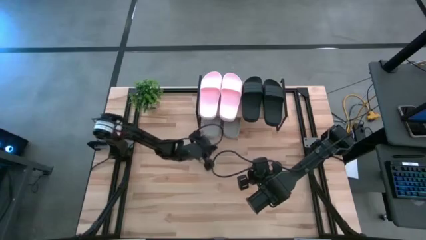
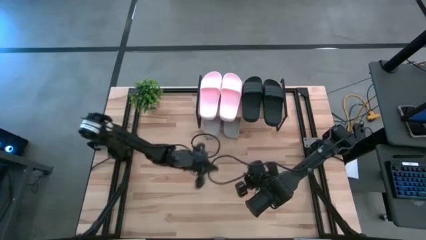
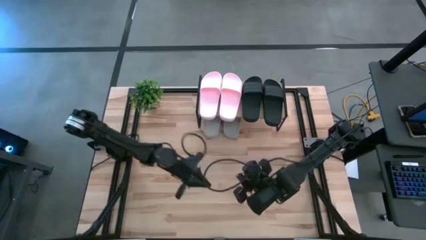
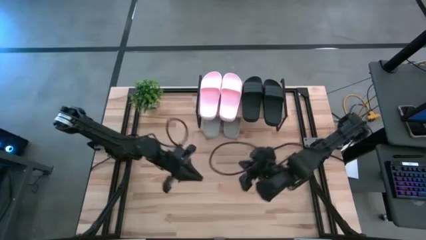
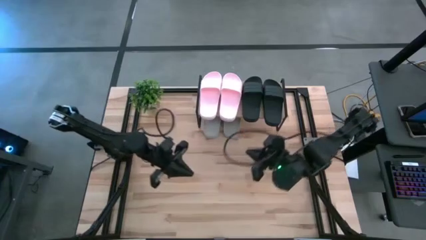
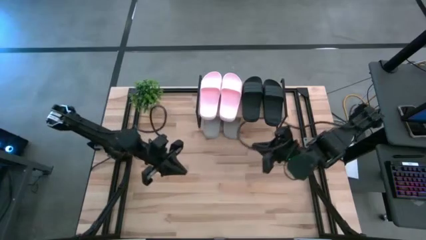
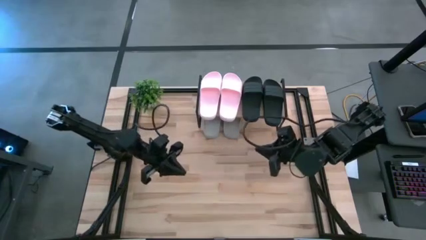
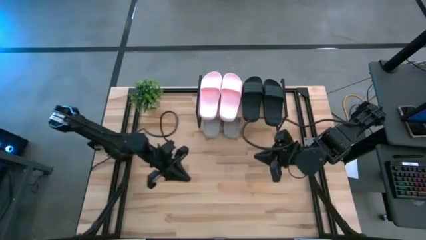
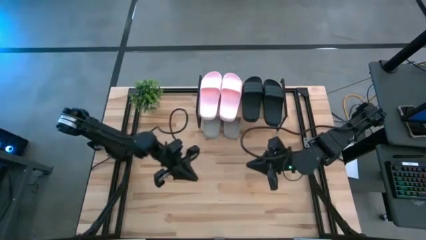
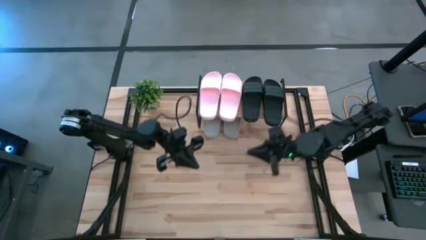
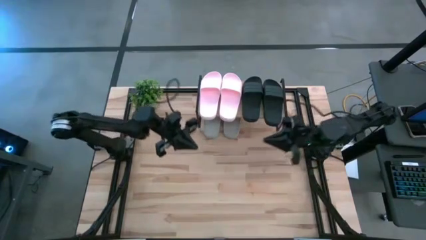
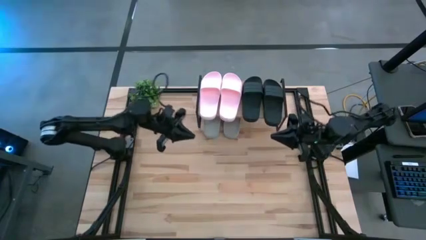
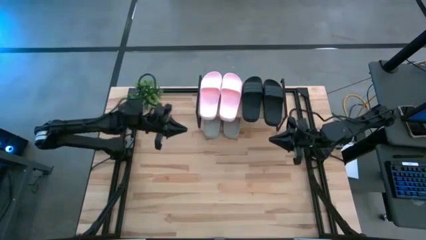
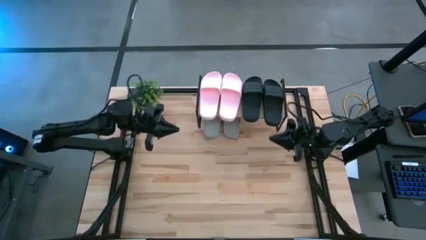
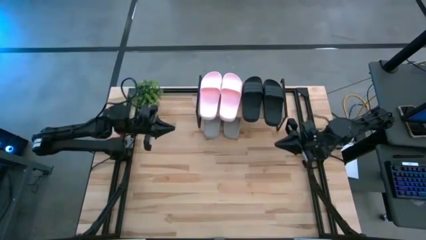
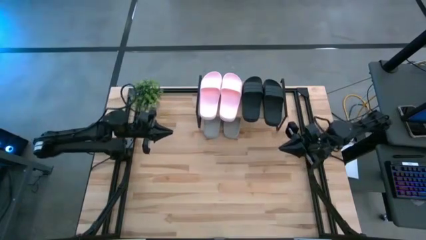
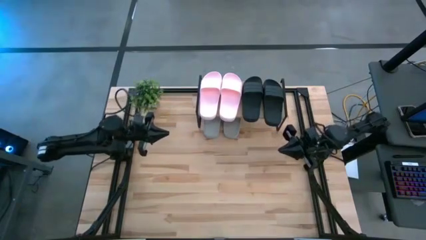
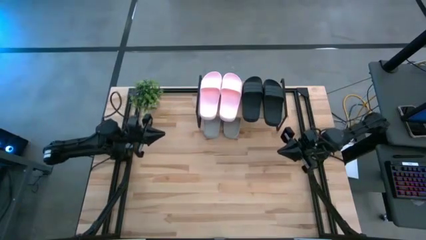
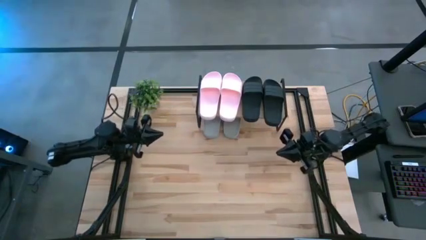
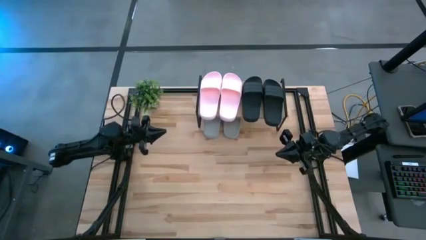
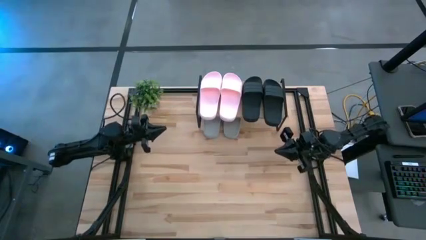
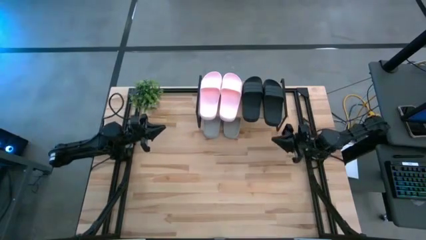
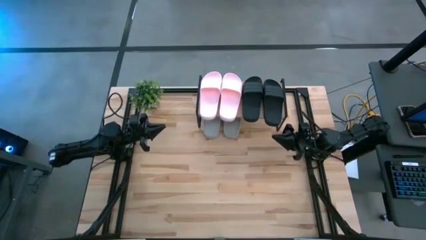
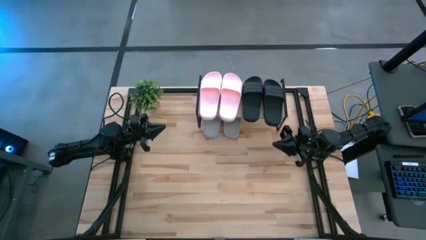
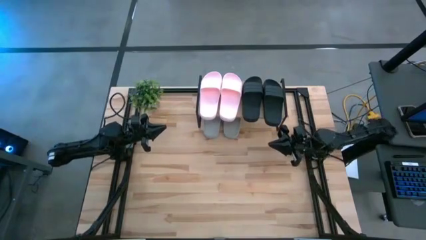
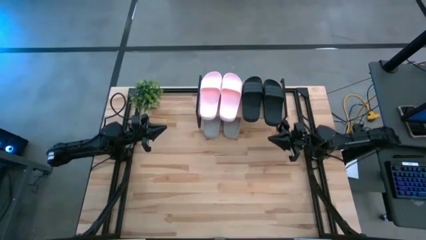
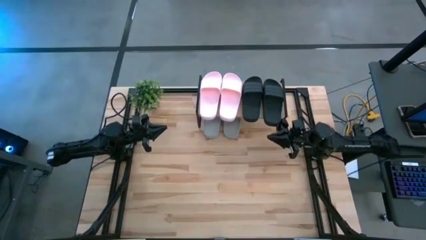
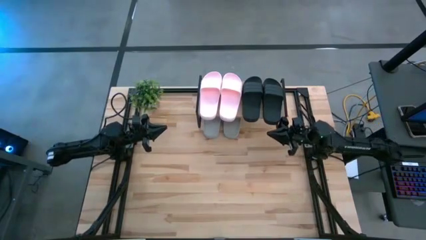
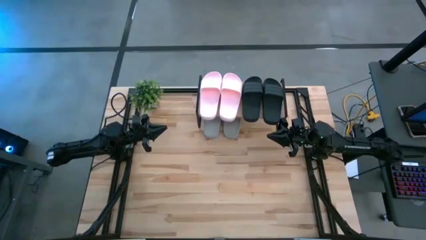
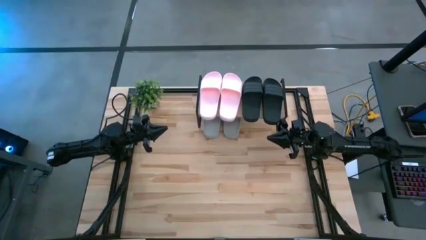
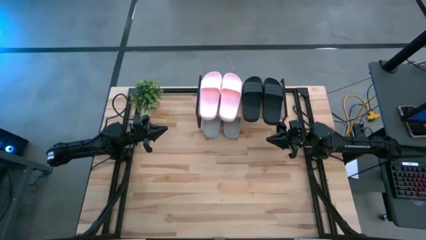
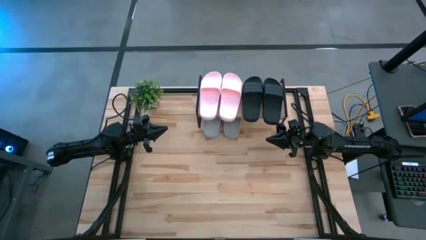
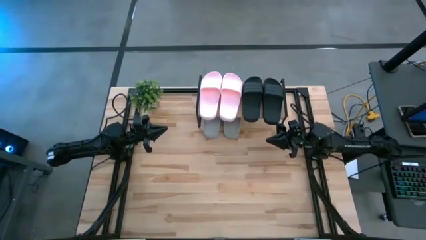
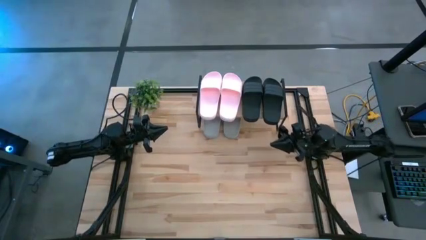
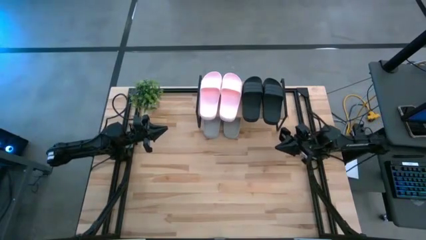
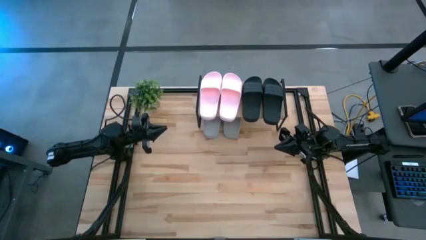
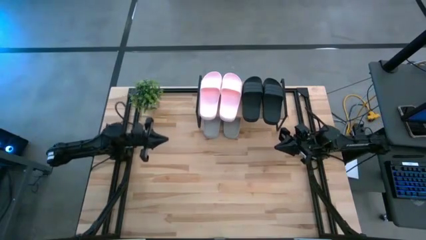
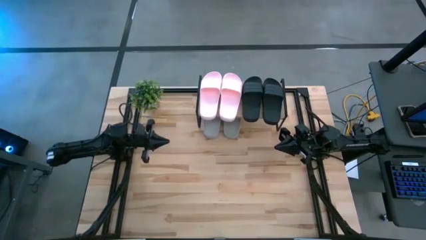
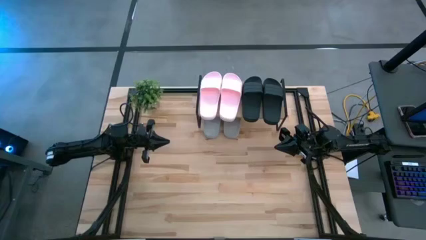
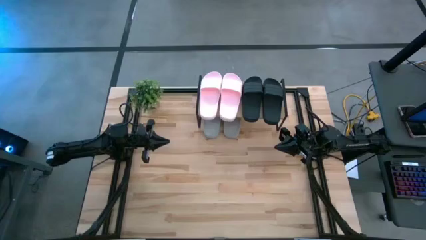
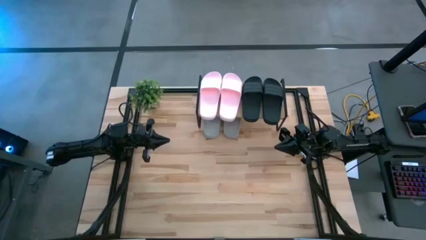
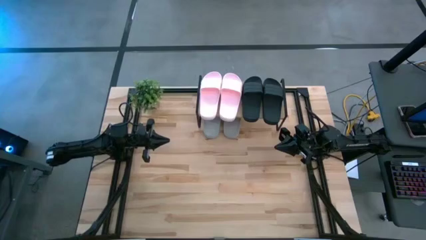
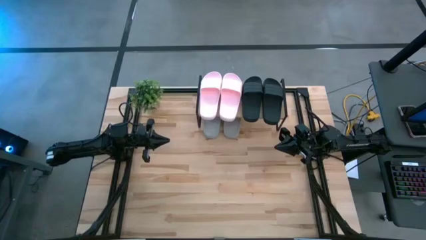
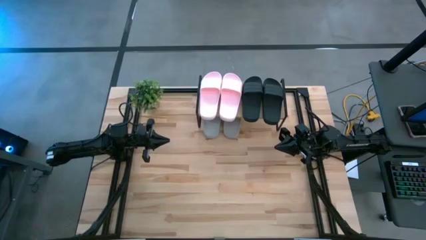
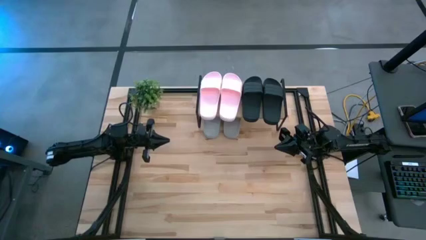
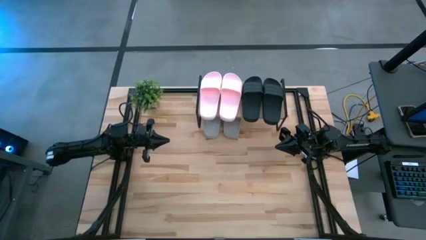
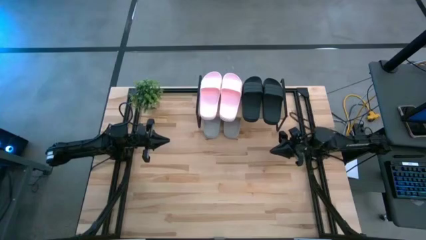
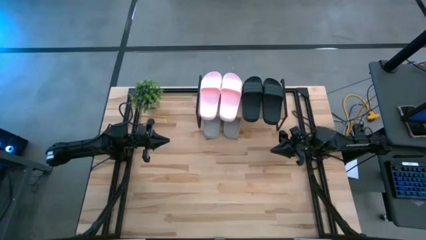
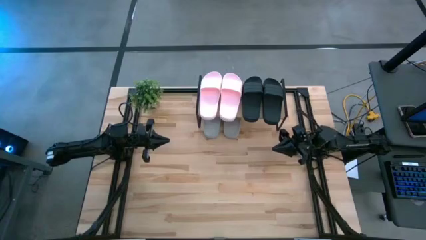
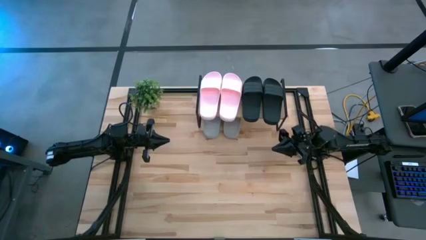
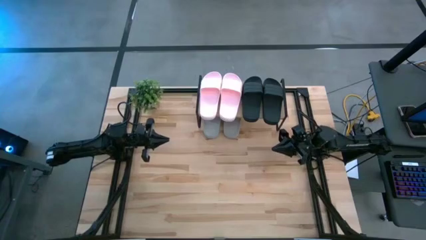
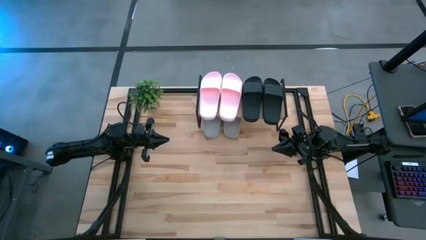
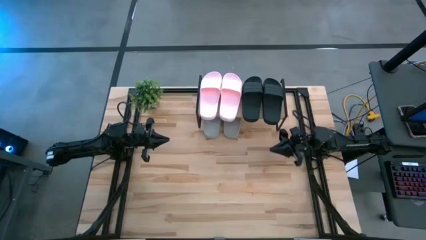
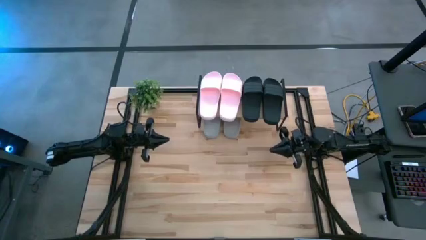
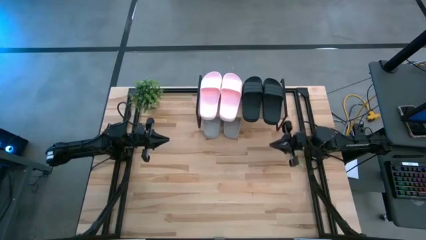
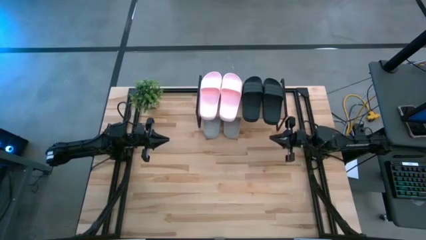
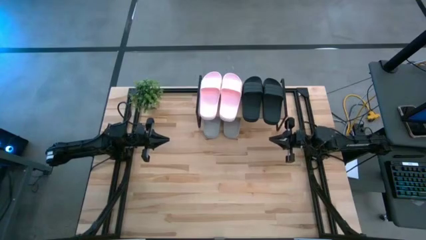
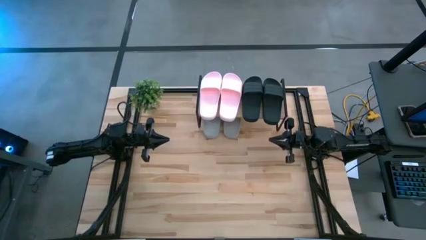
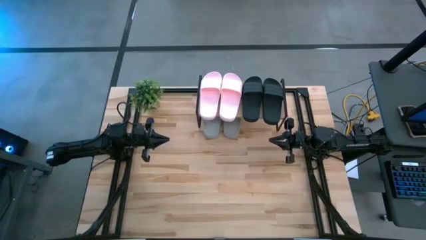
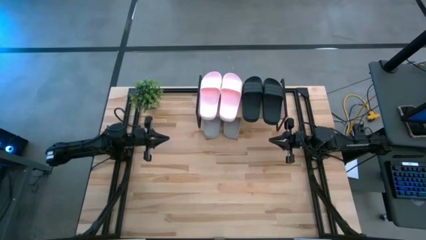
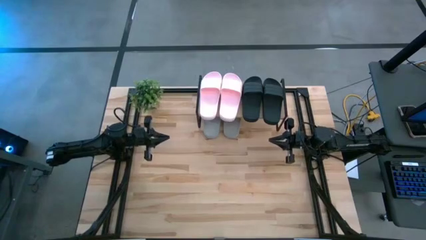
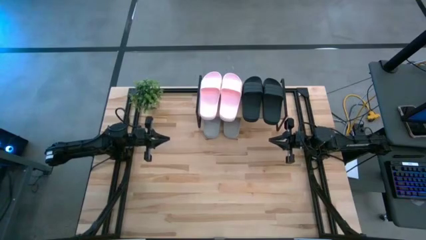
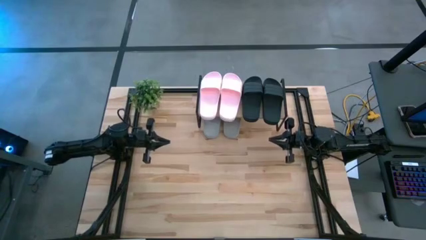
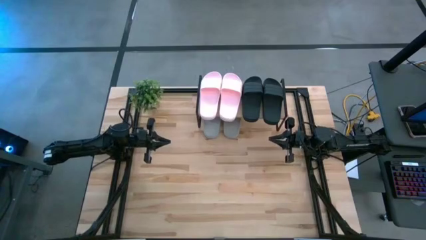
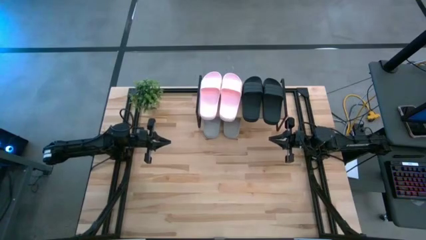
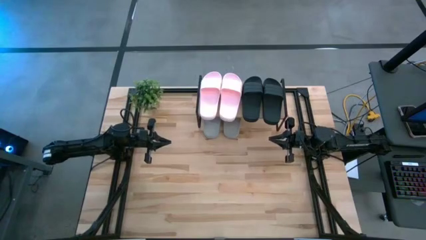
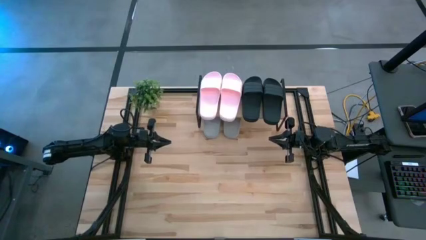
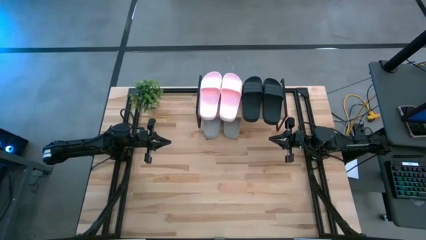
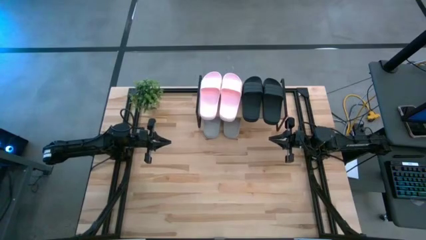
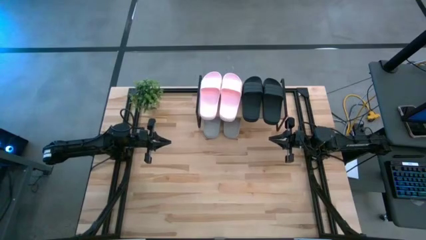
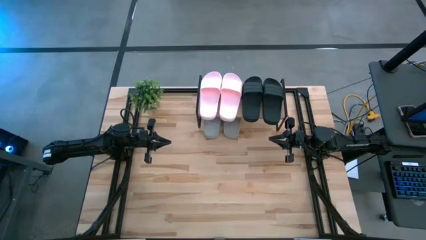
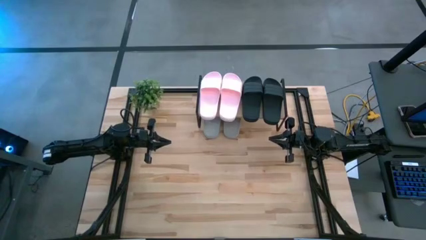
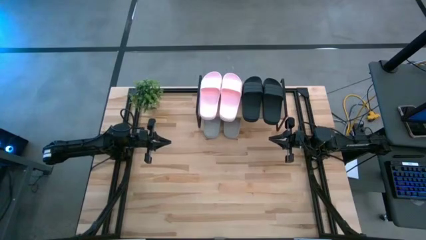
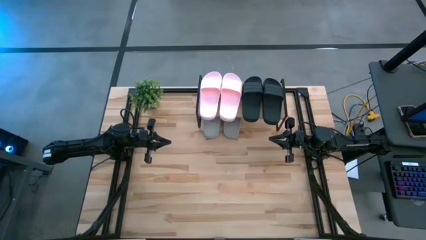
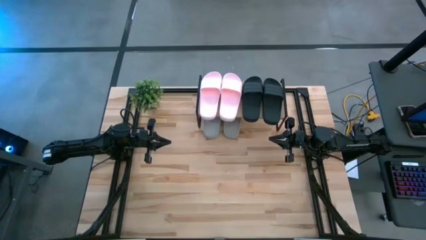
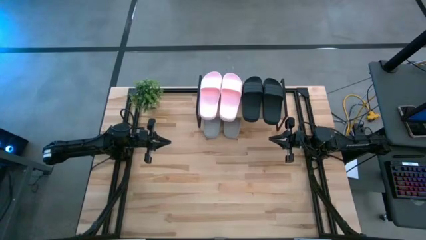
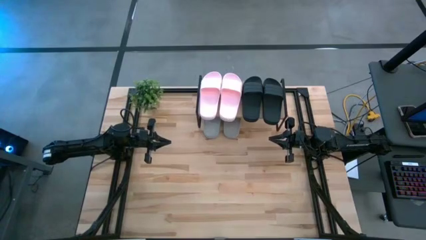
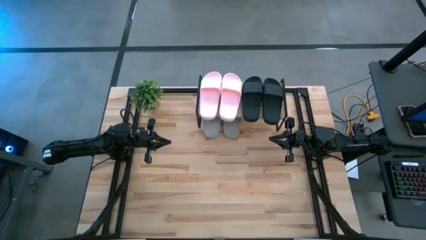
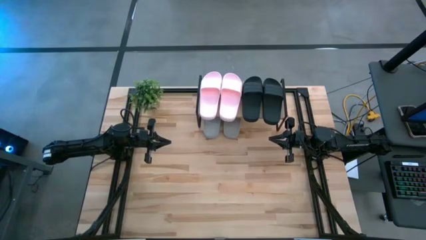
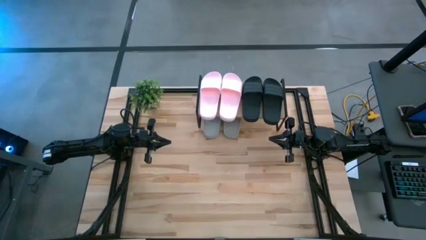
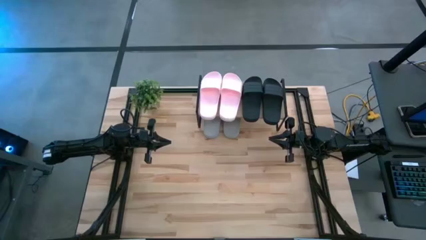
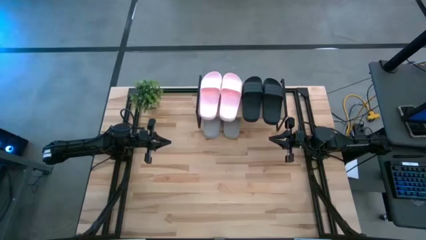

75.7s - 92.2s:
Task: Pick and place slides into the shelf
Return to Home Position
